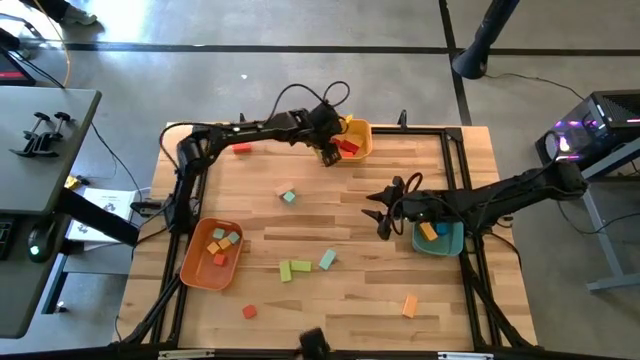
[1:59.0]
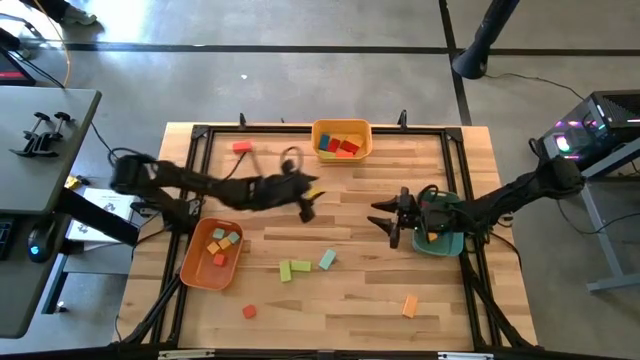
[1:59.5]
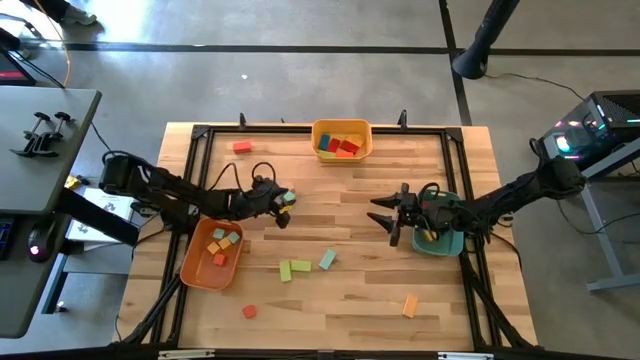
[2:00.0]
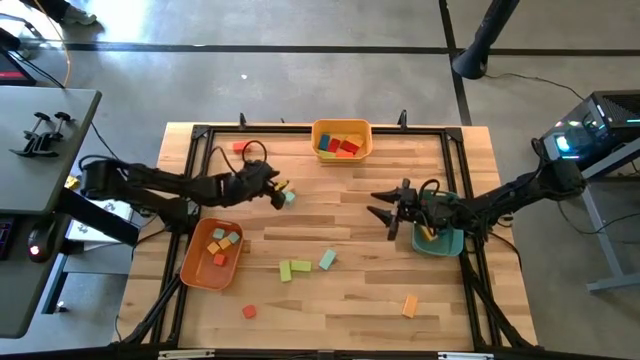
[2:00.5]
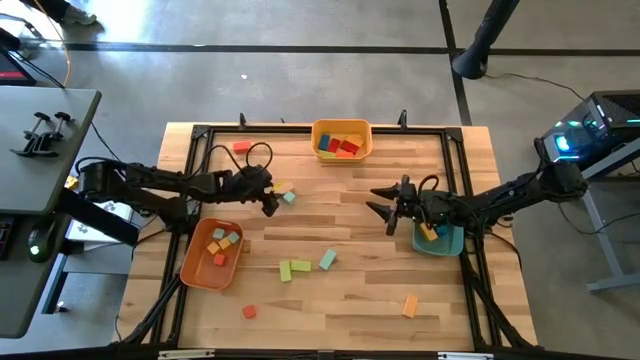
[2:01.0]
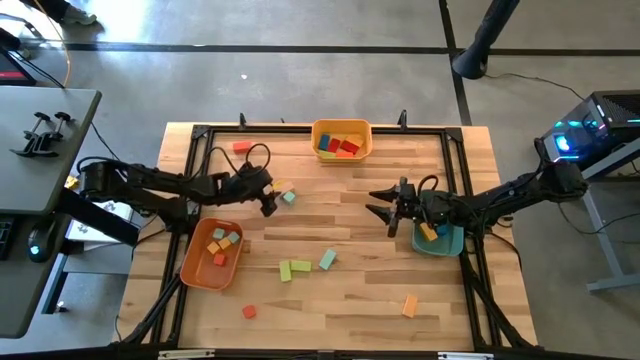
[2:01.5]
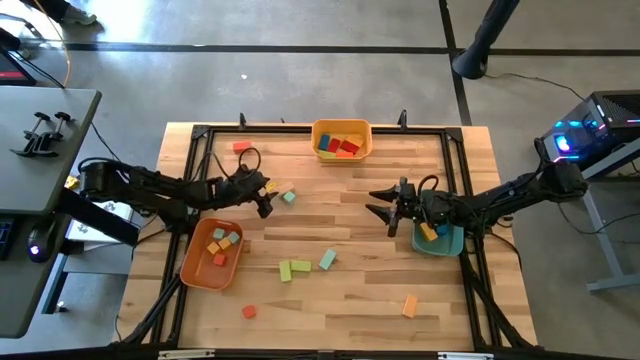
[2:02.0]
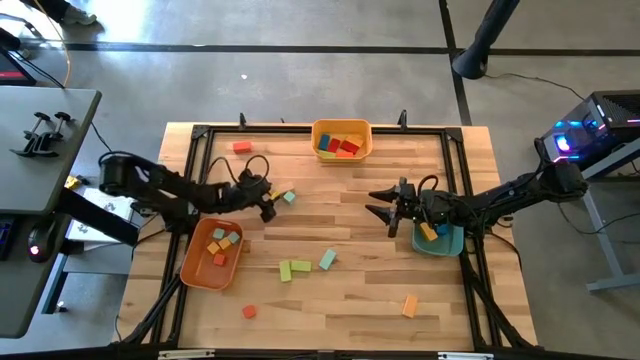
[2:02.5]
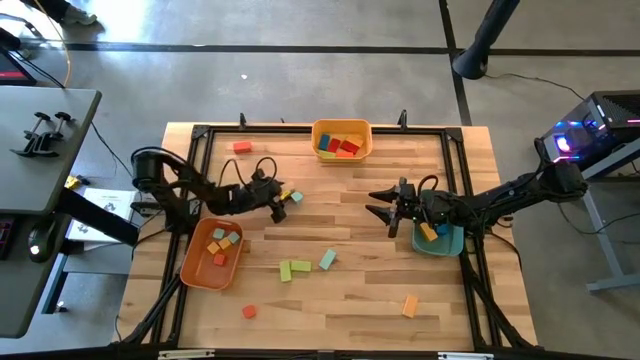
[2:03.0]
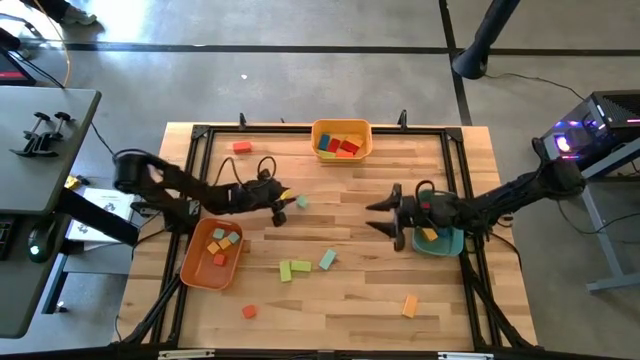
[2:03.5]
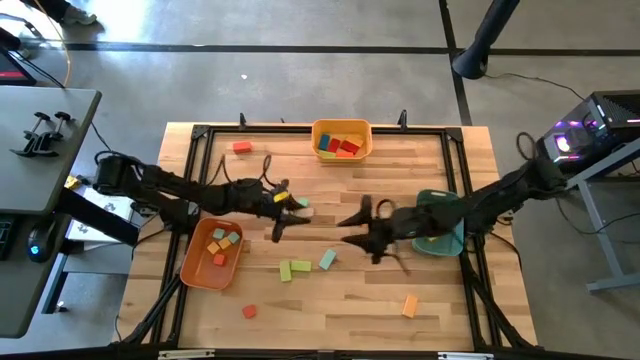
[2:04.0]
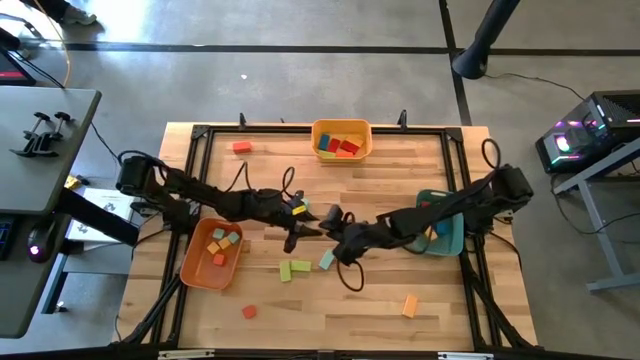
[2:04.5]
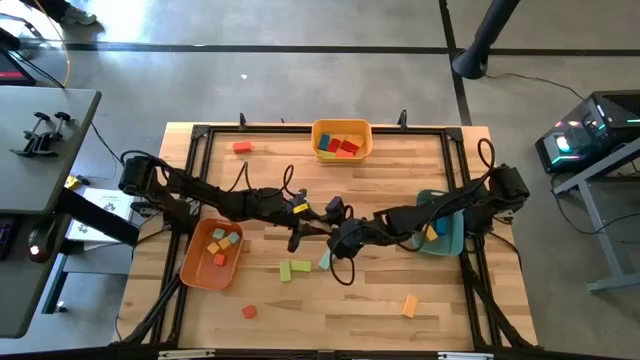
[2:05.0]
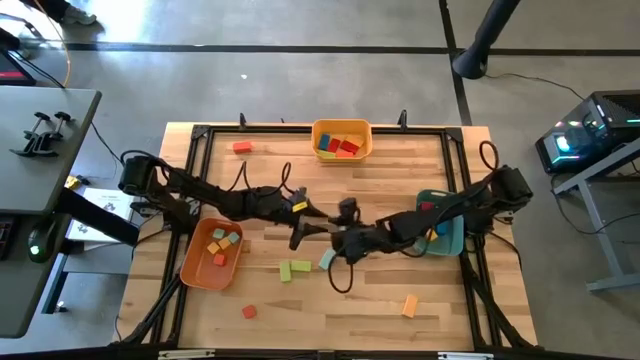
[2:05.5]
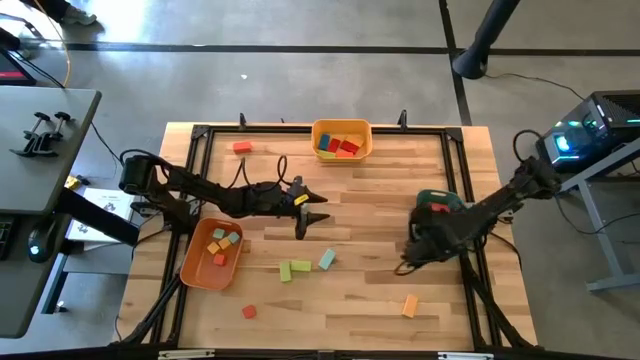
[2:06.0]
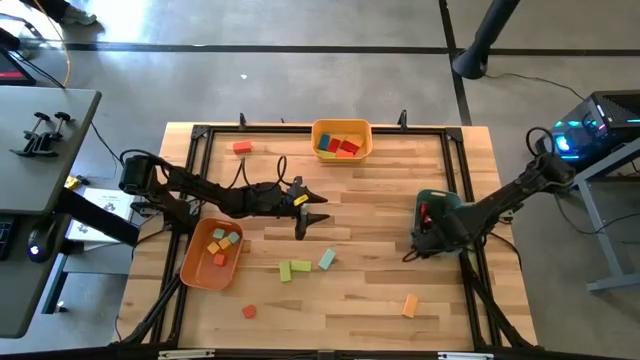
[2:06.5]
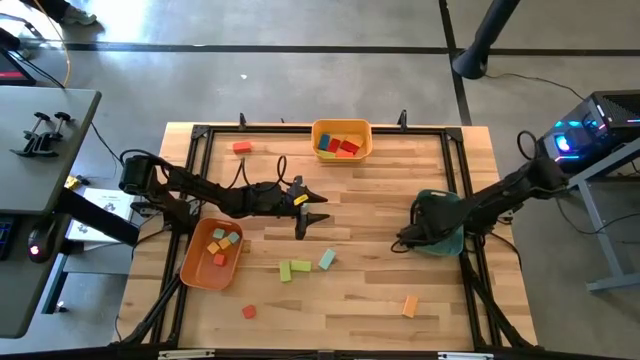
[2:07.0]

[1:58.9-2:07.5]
Task: Sort blocks by size
Put the brown thick rectangular block into the blue bin

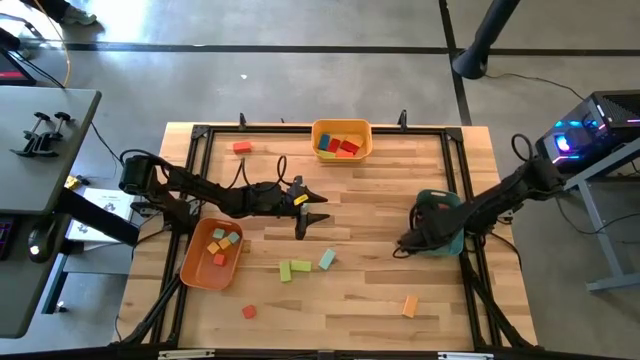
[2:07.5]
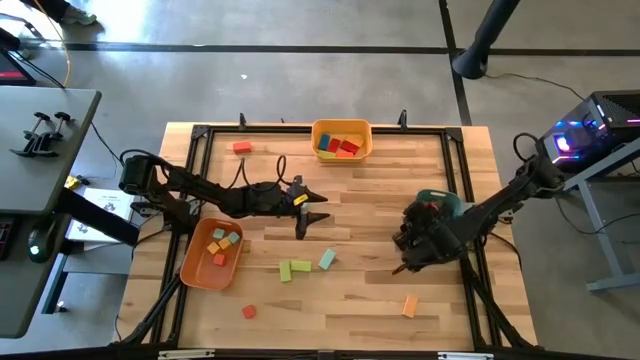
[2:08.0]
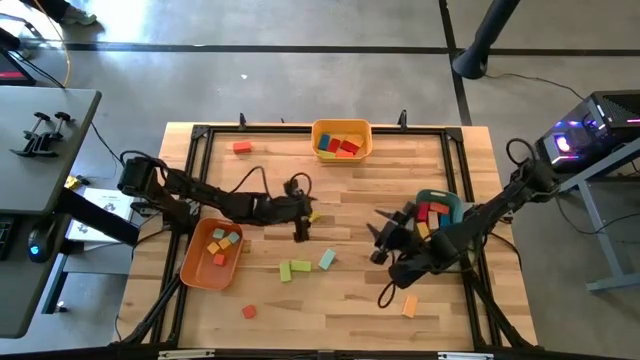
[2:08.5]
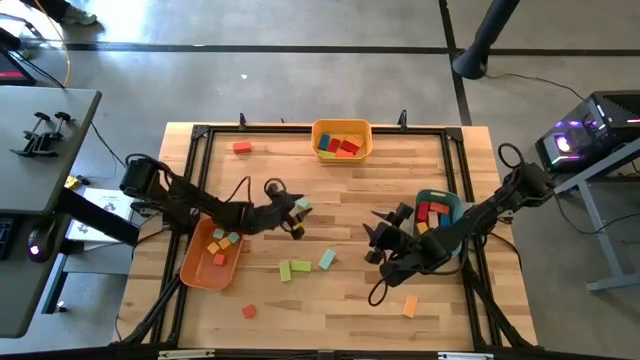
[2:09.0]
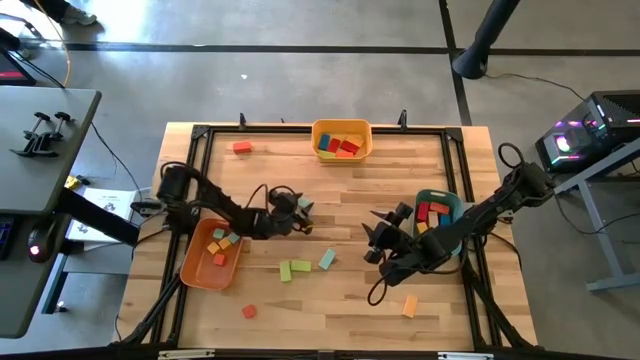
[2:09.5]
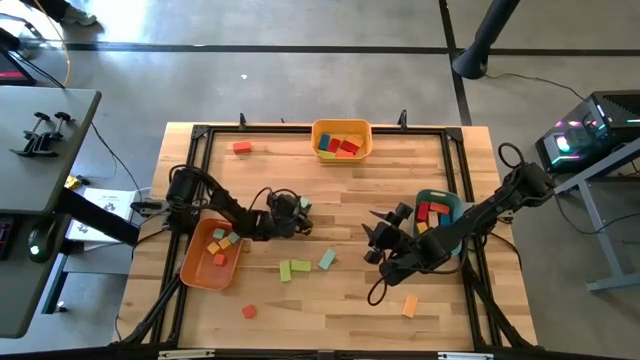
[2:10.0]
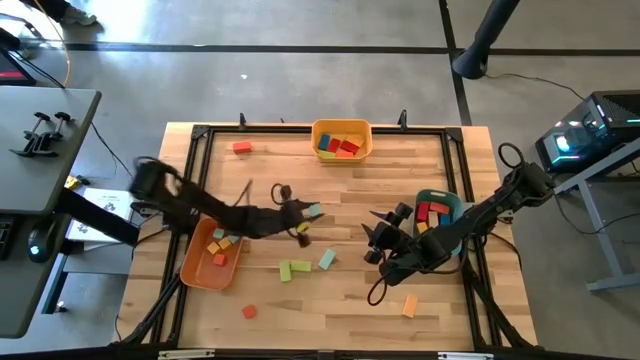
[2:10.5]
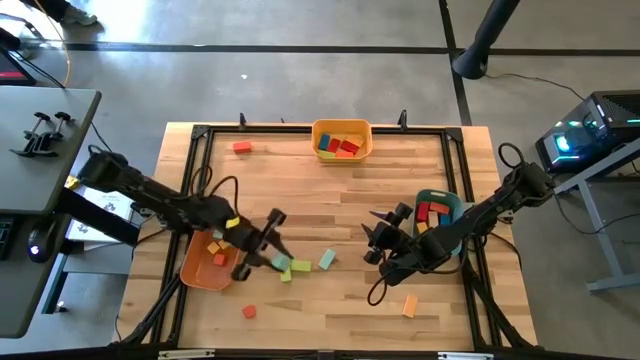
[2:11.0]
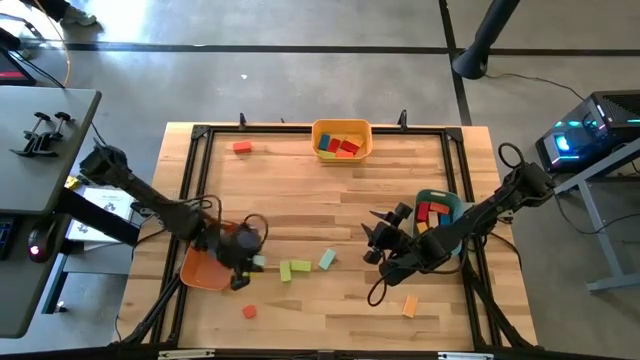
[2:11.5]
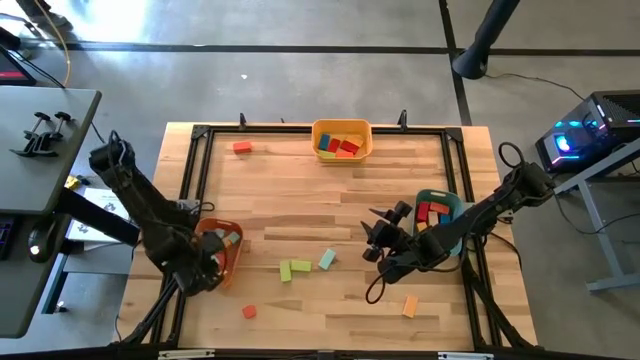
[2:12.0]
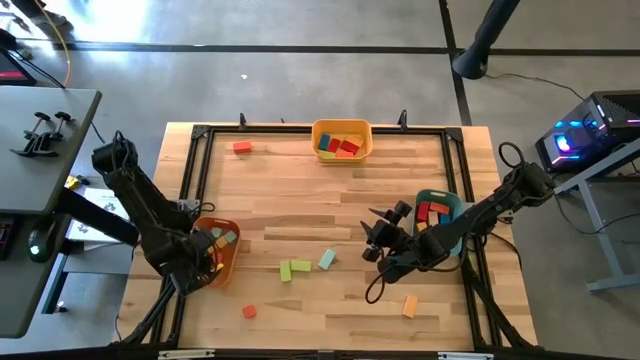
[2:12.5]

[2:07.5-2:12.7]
Put the light blue square block into the orange bin

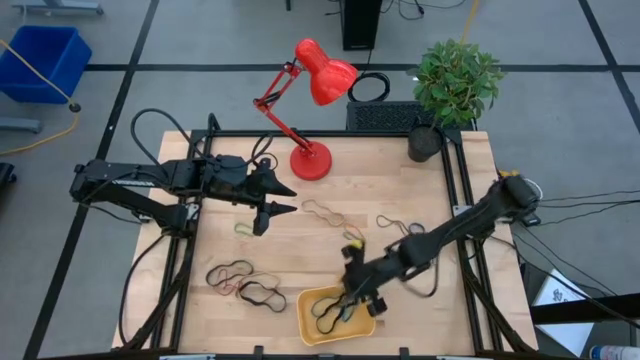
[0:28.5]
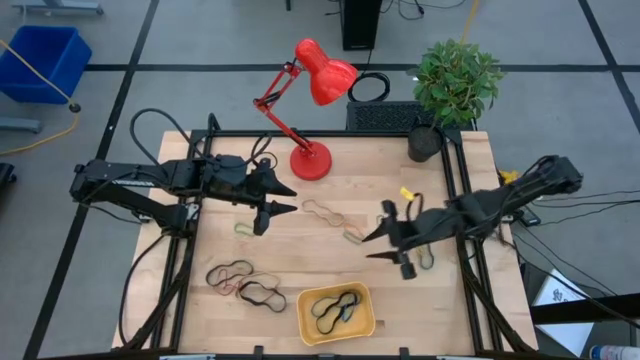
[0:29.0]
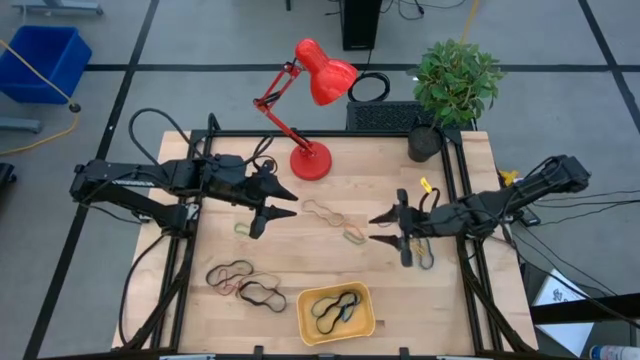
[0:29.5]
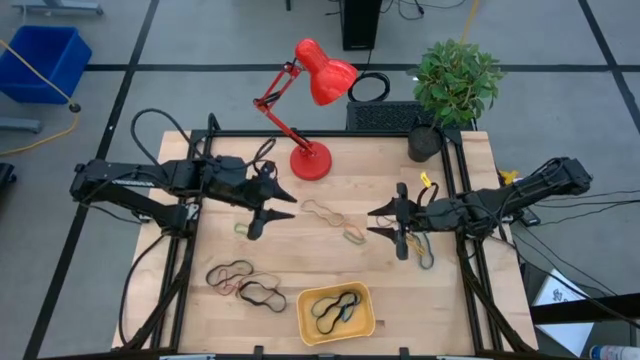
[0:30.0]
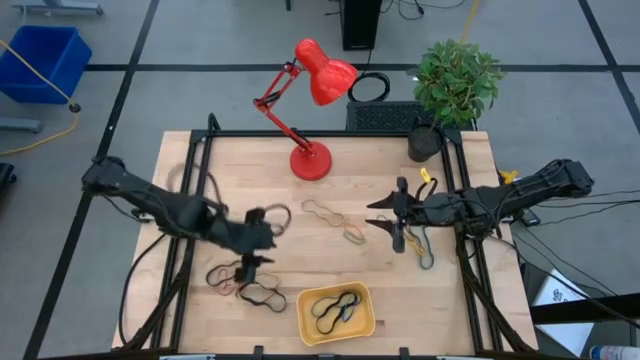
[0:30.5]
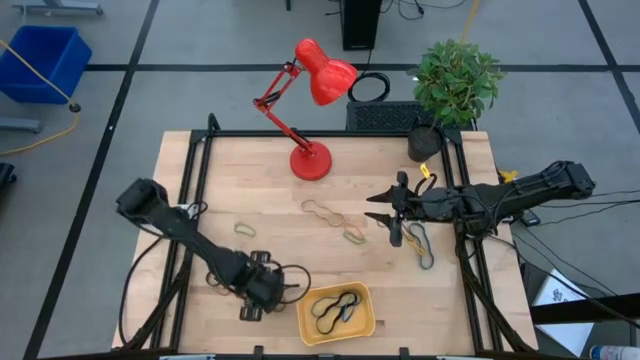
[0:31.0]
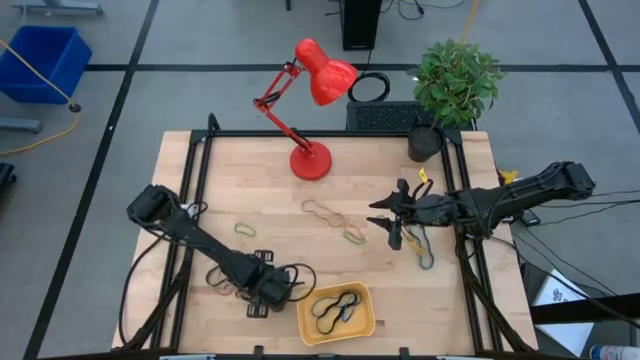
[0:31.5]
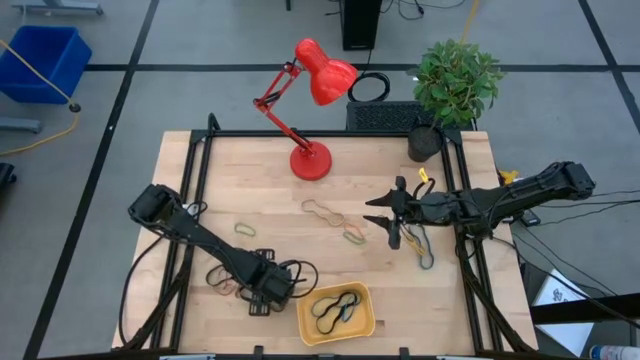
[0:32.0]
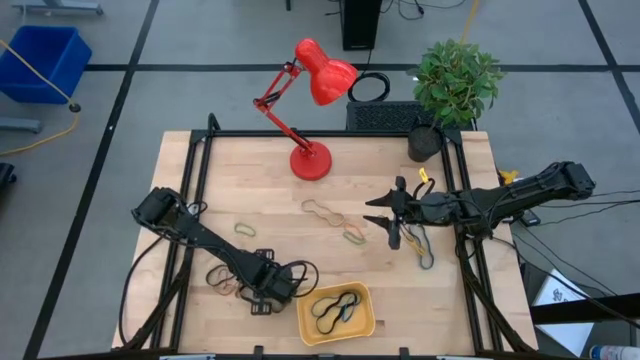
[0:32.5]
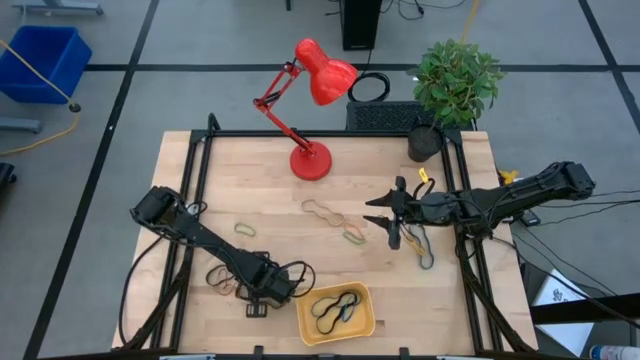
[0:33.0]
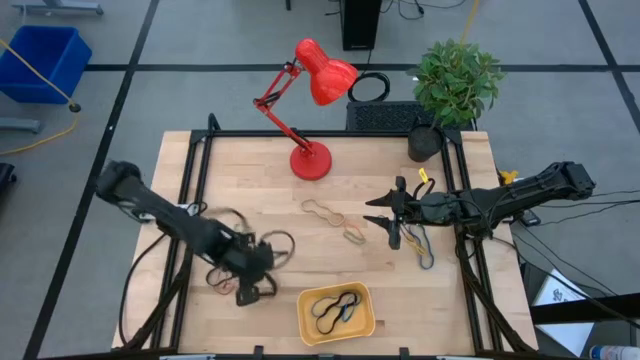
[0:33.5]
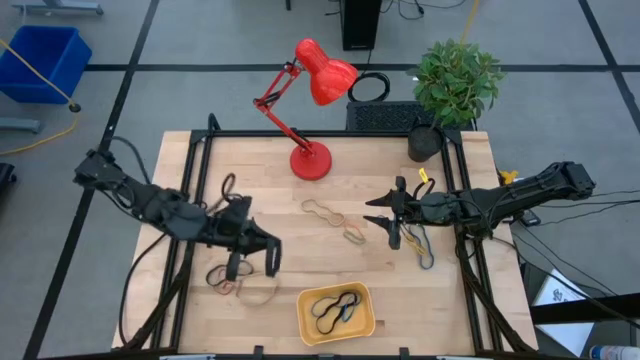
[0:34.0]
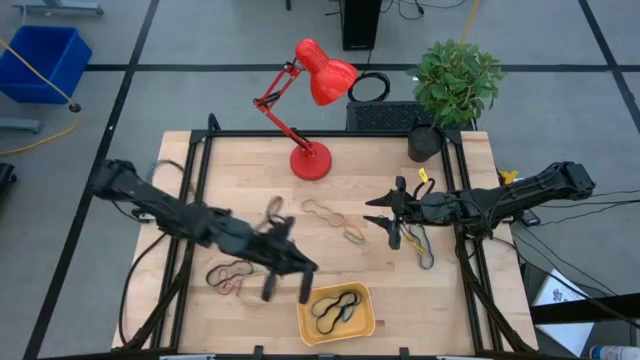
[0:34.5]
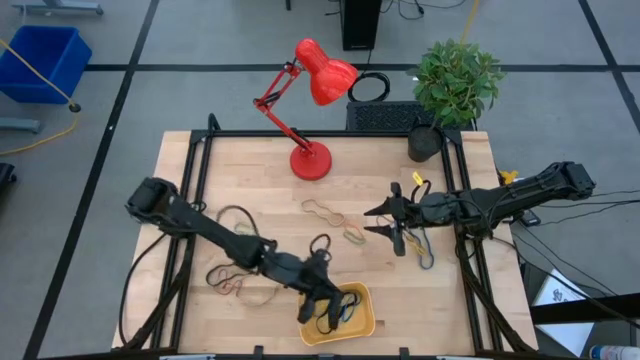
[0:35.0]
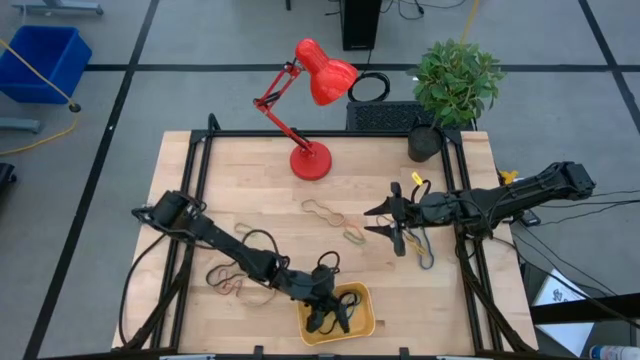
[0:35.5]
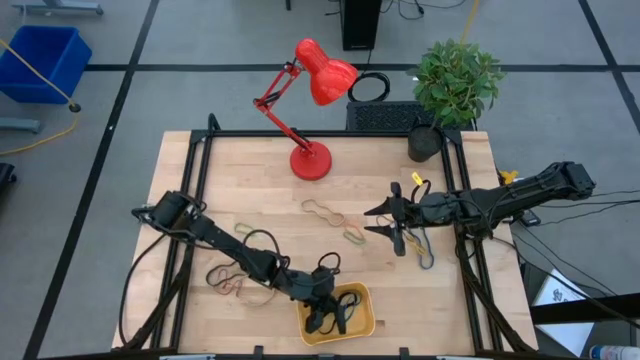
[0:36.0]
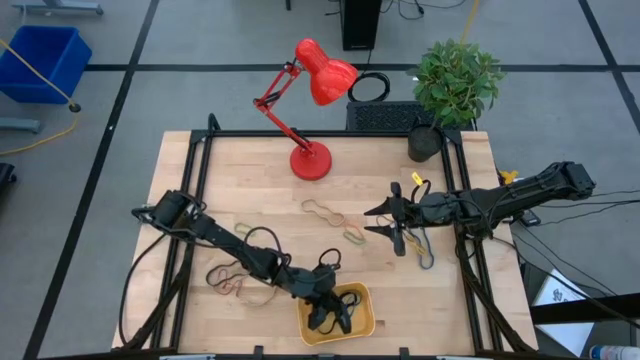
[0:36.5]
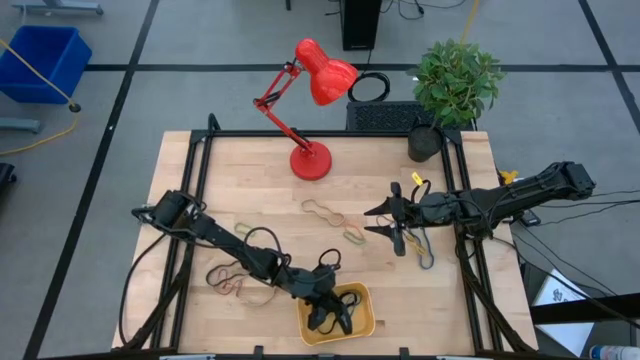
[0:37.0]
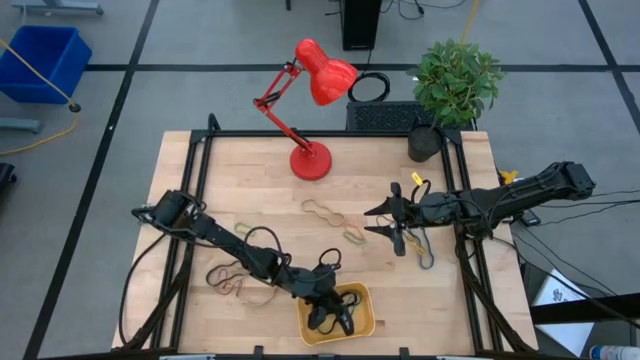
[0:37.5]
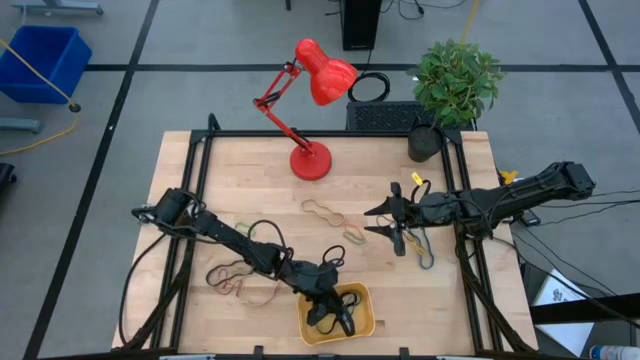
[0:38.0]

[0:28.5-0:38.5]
Task: Pick and place rubber bands into bin
Put the bottom left black rubber band into the yellow bin
